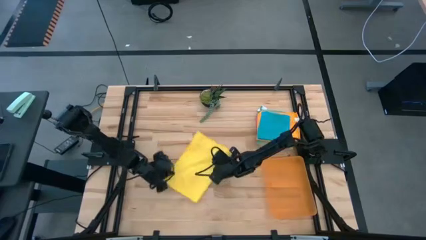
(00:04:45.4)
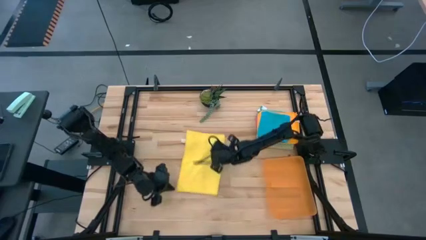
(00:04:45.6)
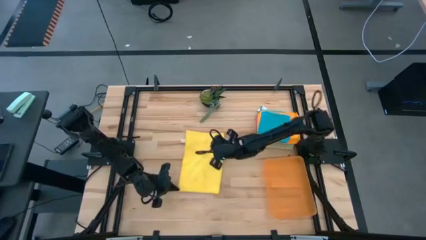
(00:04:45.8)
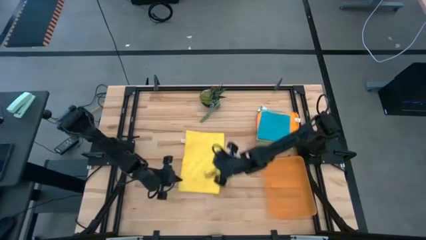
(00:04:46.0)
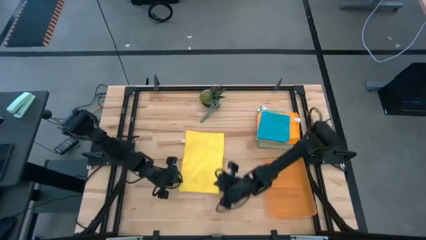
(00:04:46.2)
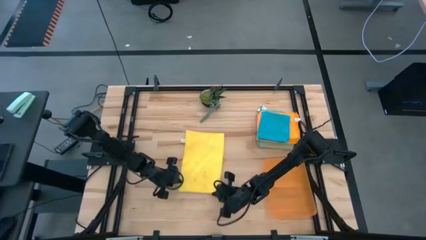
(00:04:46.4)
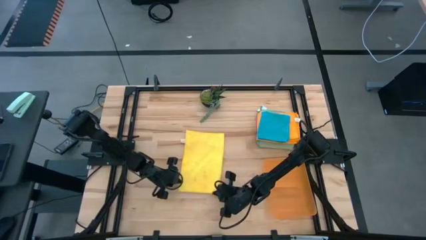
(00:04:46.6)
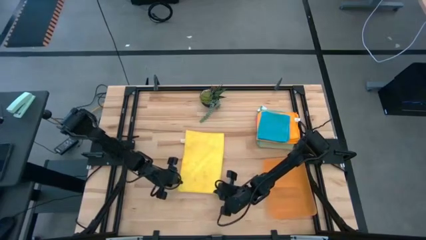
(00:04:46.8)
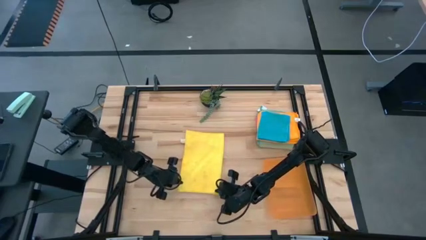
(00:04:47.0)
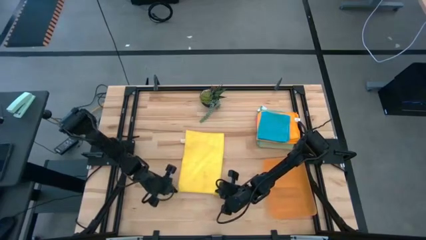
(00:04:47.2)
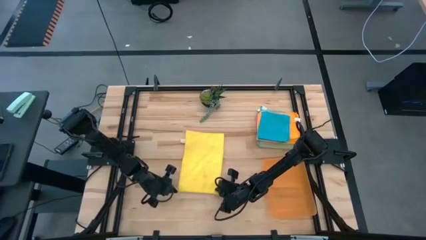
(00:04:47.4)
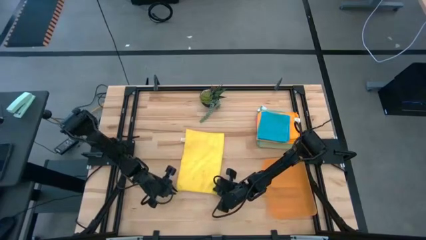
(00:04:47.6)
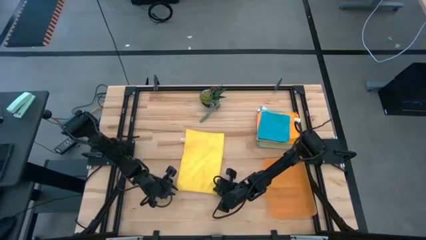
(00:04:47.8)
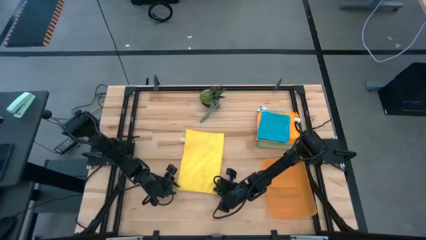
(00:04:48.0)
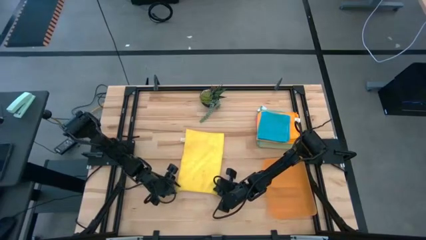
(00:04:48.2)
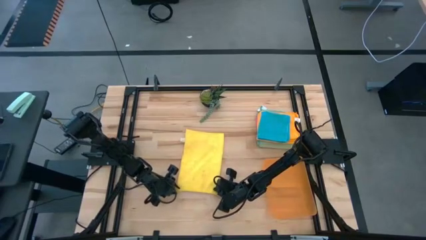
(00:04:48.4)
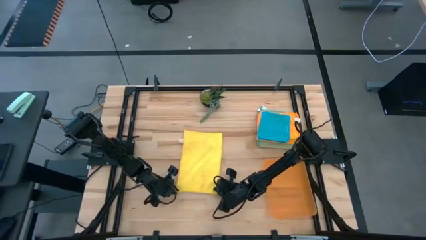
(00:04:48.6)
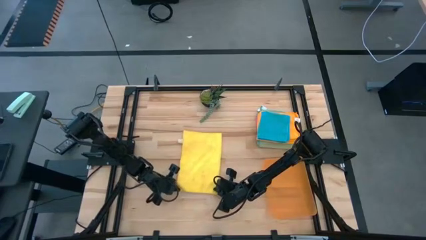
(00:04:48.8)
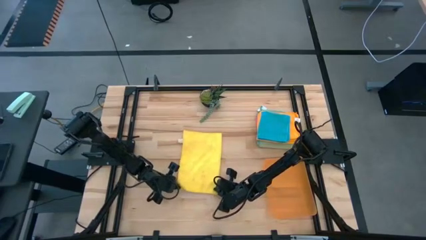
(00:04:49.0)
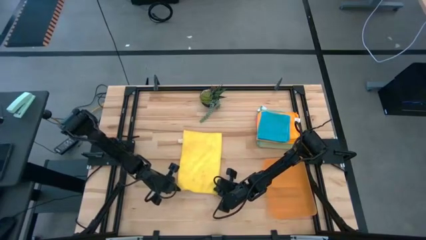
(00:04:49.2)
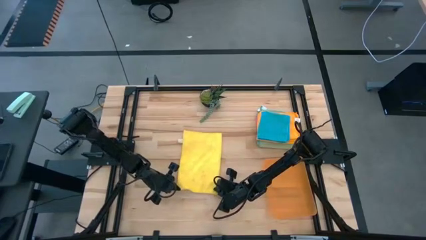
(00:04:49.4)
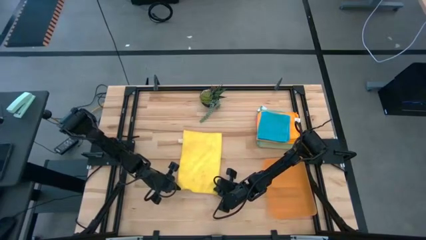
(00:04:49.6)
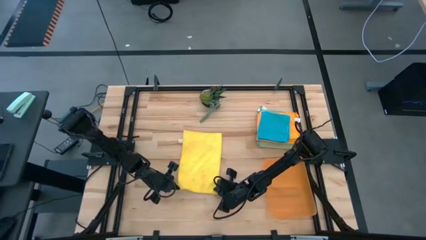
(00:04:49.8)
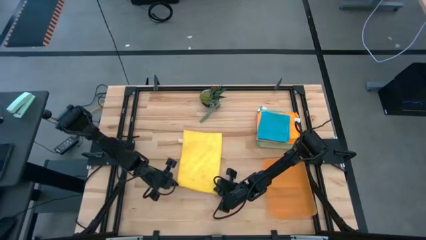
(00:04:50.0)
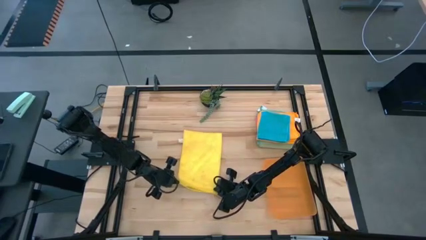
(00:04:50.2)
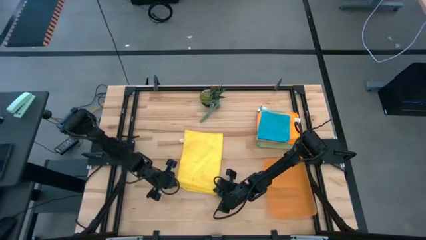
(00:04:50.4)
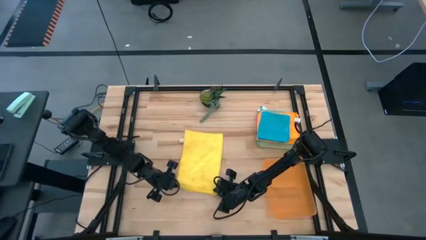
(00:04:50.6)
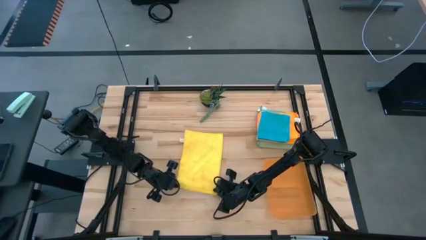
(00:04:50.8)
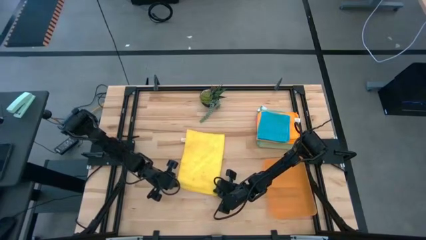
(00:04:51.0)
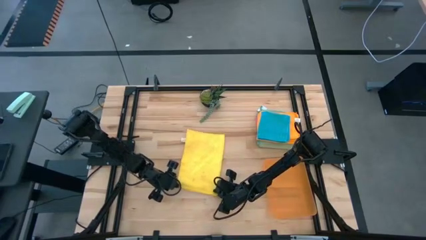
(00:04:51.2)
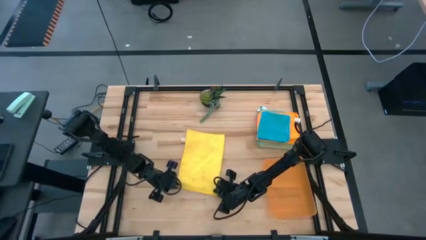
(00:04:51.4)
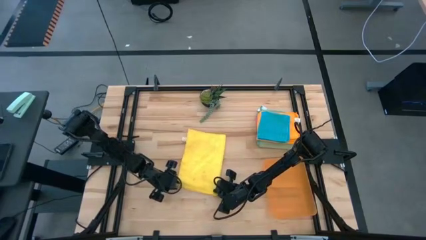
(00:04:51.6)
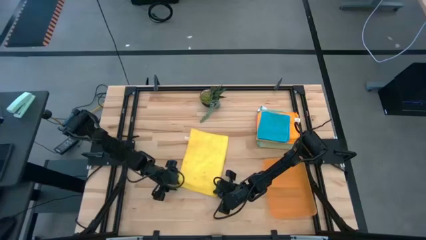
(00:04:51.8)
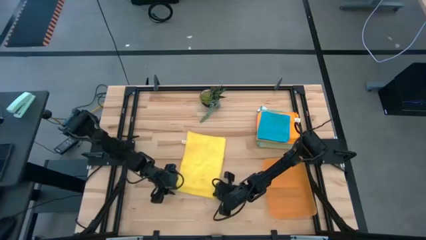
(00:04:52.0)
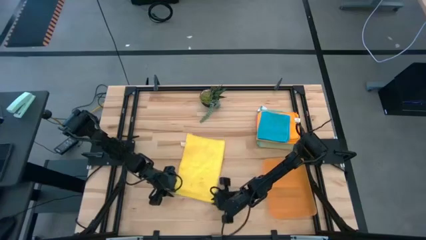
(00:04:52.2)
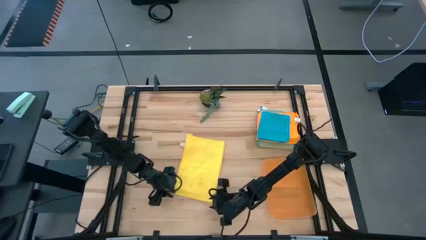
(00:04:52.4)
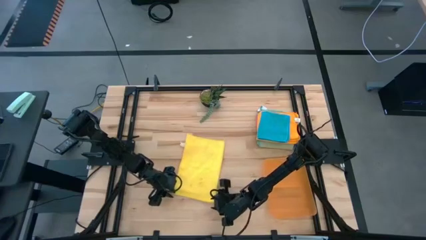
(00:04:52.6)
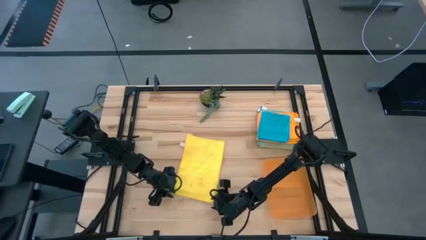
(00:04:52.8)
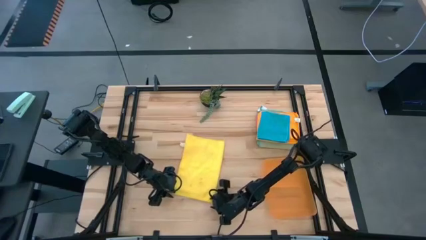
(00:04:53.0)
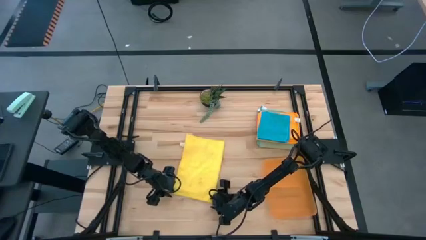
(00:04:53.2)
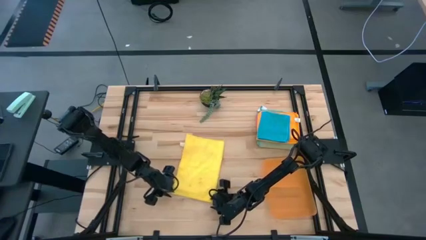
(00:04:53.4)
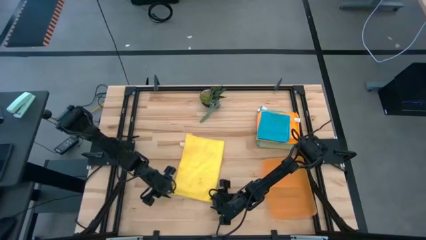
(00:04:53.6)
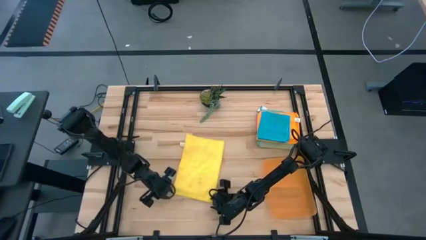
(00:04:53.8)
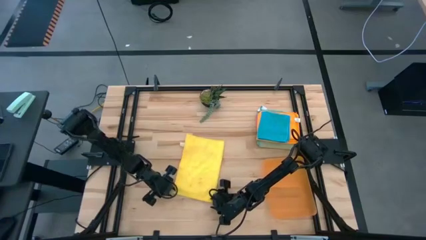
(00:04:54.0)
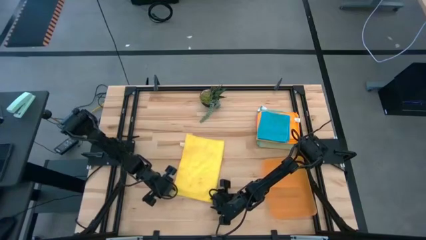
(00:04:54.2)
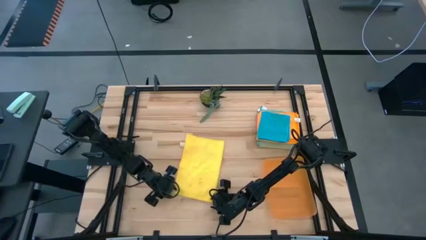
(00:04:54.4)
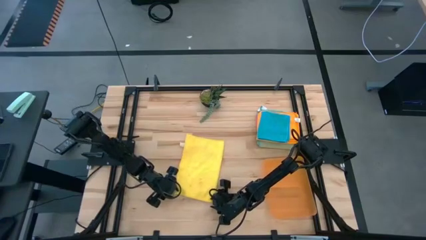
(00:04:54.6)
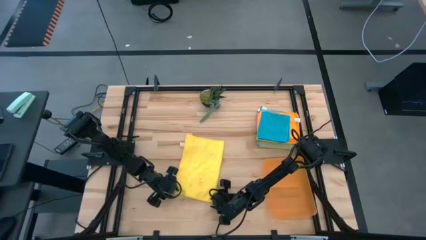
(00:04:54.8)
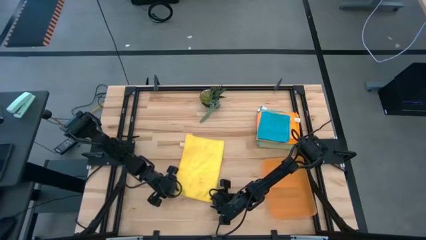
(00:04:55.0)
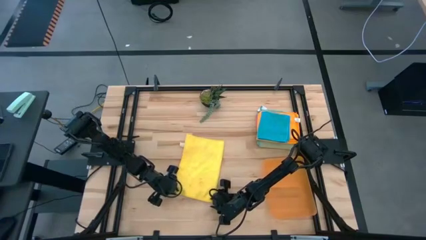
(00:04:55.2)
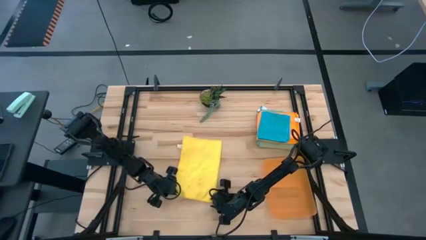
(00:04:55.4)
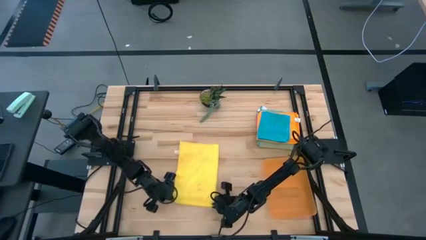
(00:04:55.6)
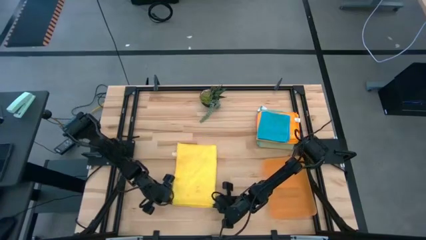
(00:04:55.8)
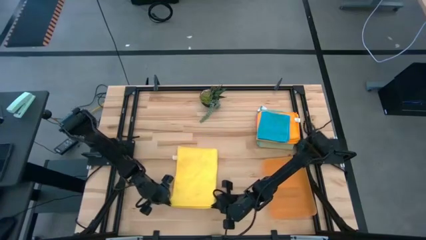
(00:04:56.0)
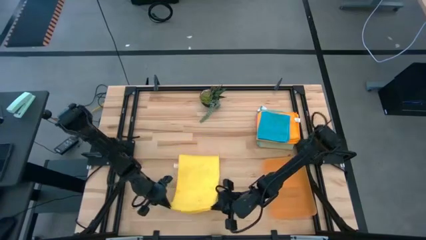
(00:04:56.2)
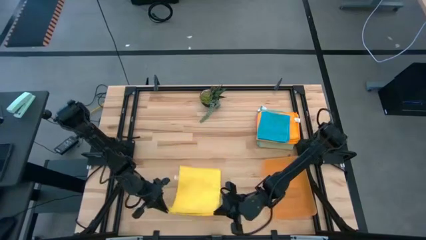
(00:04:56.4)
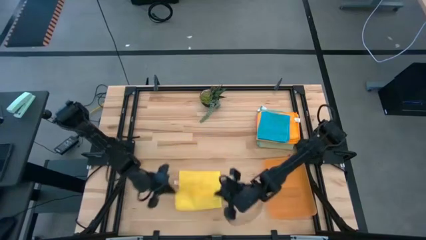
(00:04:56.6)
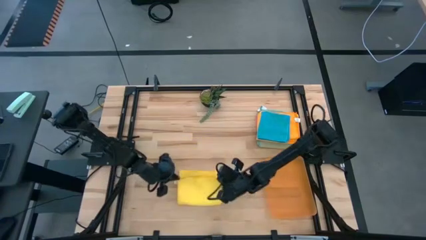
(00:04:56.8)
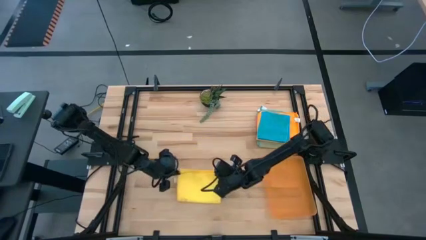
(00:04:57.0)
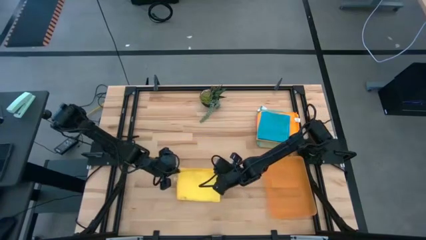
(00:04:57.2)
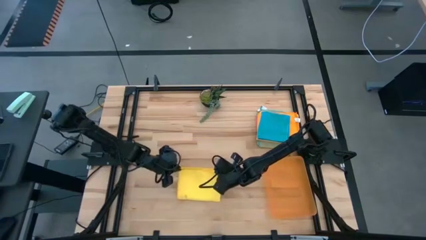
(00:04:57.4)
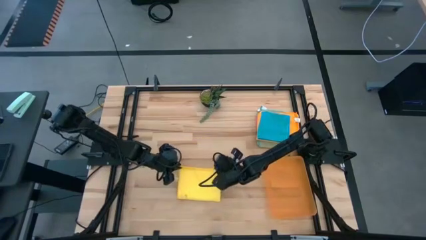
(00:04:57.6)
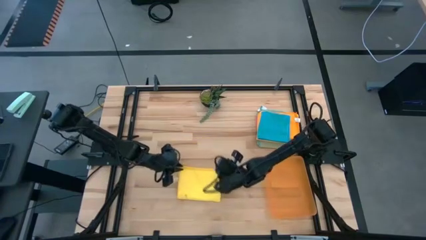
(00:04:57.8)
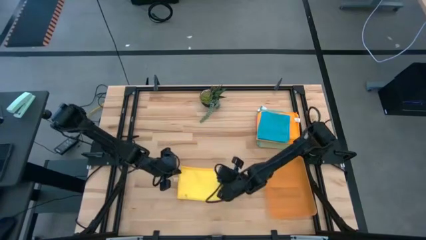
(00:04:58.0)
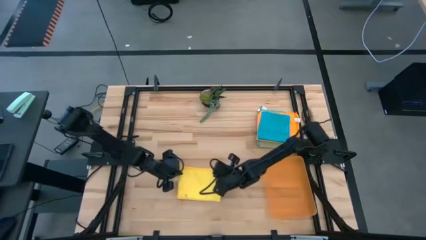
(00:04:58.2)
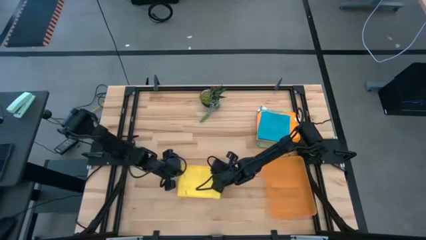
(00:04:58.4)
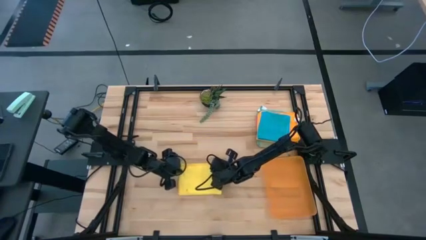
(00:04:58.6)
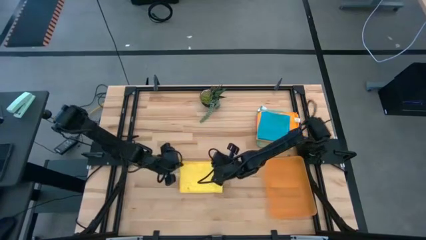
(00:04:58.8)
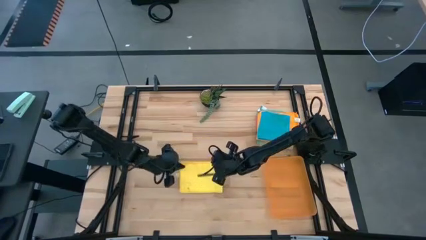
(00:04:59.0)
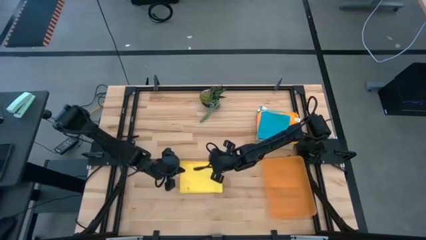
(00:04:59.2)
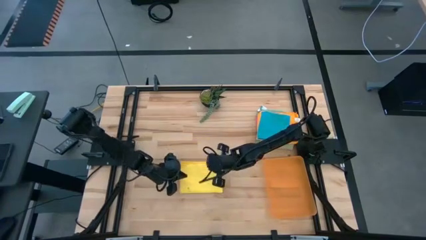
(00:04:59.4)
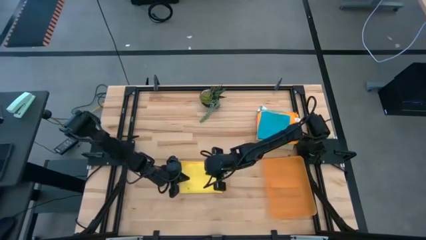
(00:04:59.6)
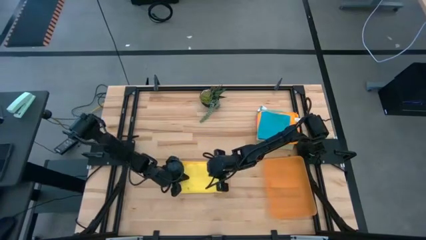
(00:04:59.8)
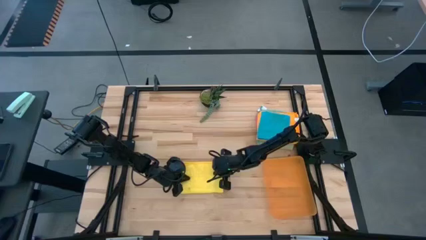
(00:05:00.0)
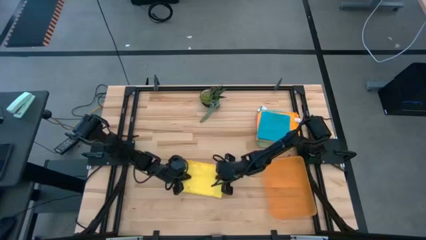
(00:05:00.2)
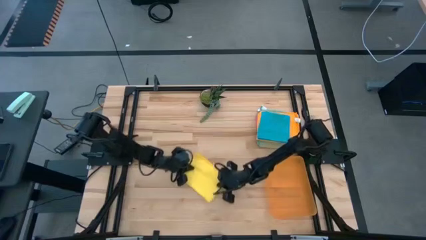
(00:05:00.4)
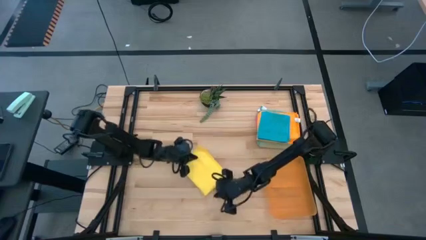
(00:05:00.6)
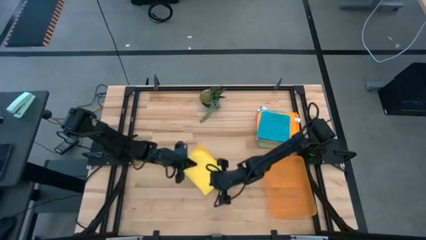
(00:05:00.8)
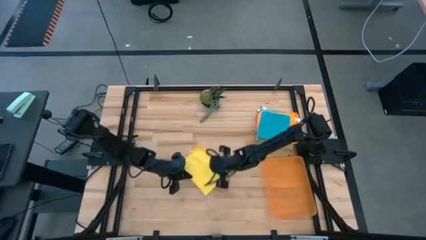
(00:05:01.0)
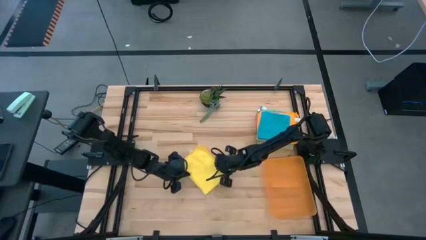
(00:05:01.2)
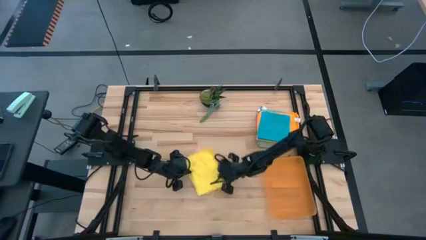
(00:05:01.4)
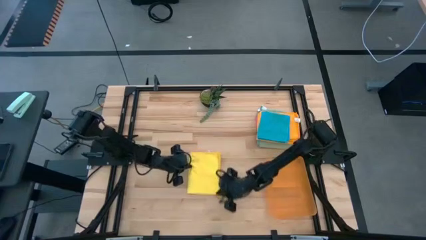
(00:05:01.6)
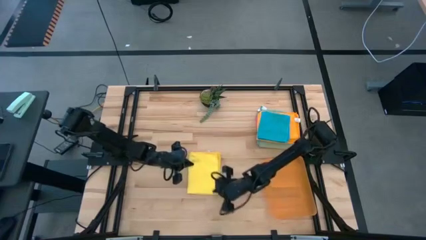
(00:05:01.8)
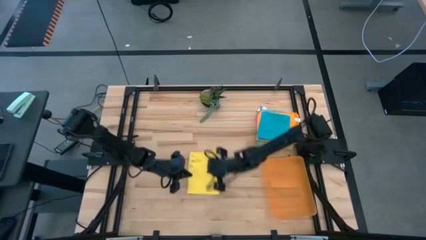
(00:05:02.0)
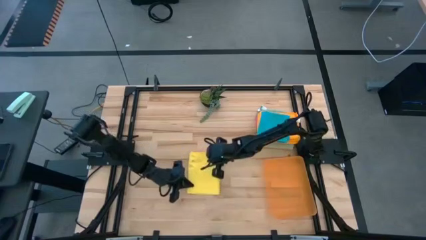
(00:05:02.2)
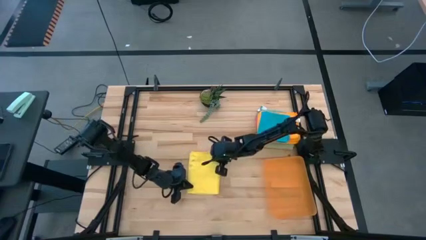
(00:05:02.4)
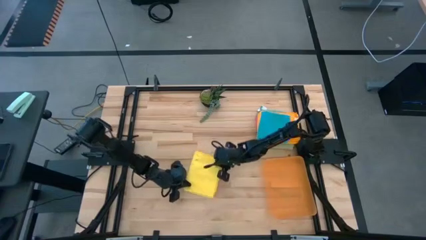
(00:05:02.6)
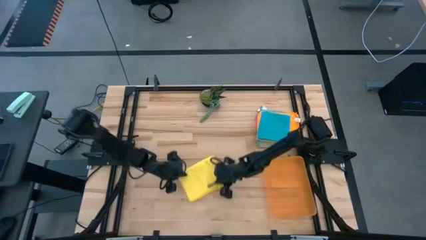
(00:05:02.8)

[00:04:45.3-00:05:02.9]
Task: Fold microfiber towels
Fold the yellow microfiber towel
